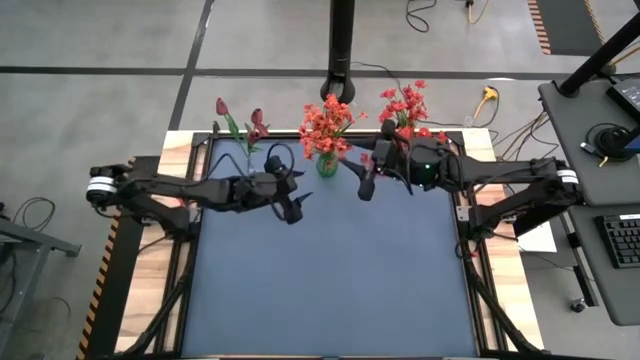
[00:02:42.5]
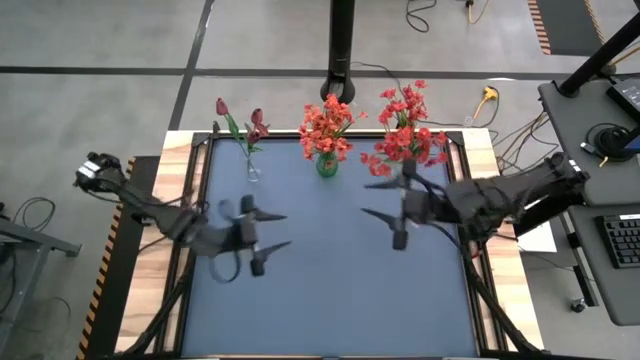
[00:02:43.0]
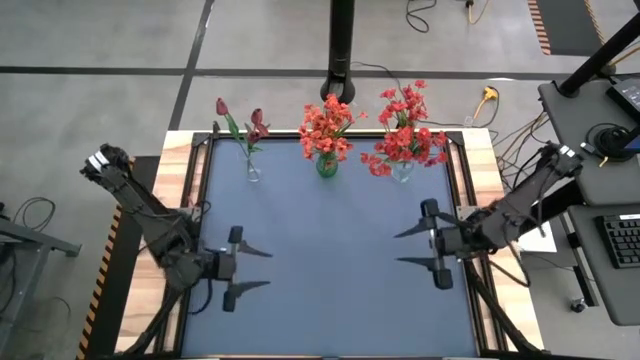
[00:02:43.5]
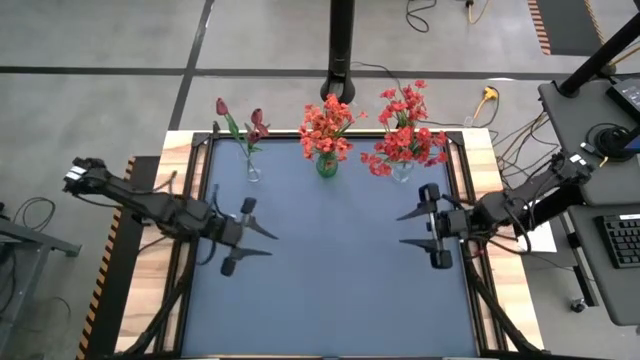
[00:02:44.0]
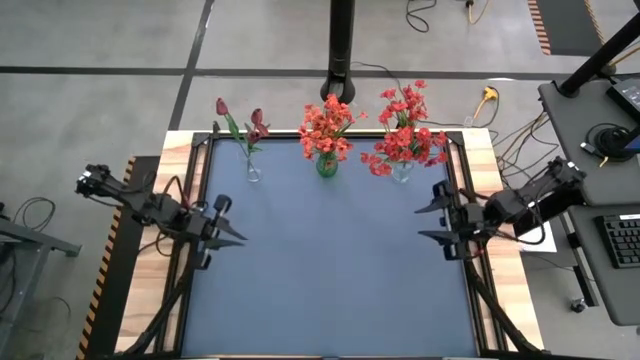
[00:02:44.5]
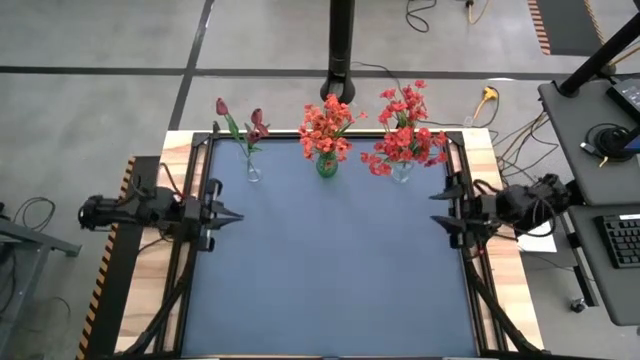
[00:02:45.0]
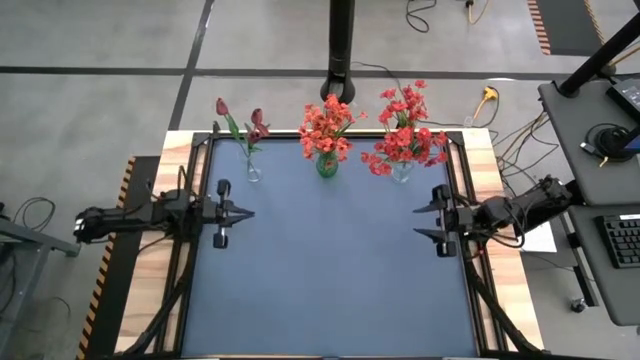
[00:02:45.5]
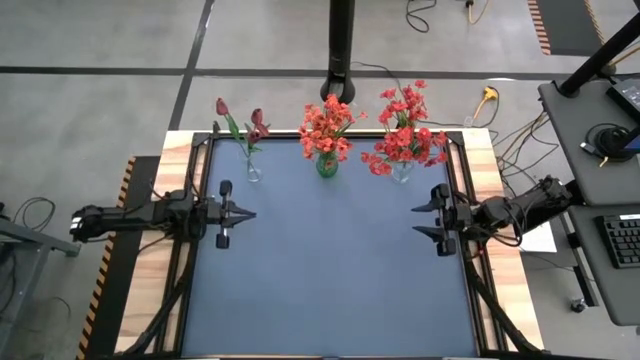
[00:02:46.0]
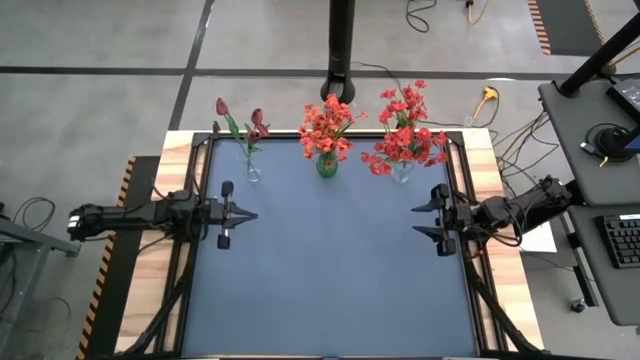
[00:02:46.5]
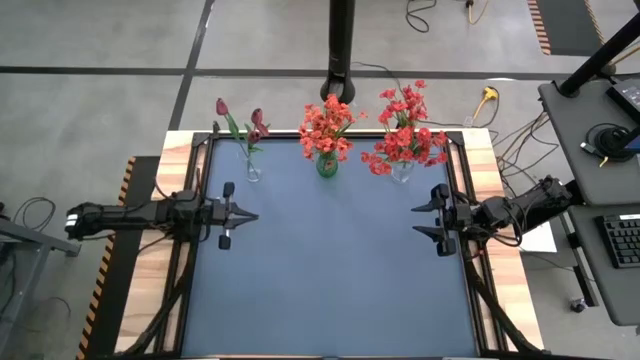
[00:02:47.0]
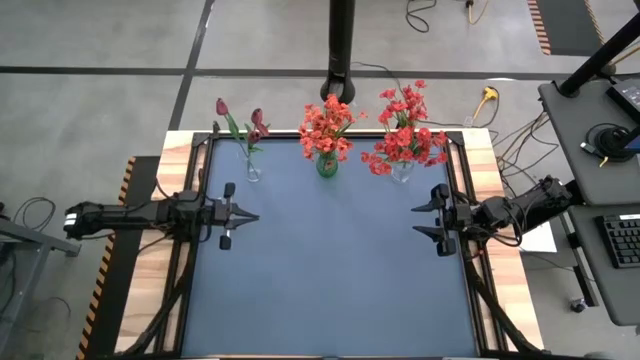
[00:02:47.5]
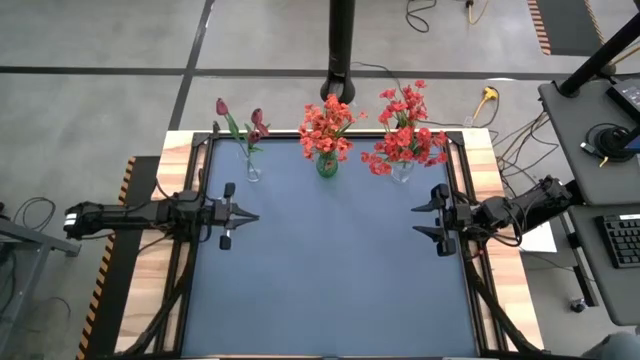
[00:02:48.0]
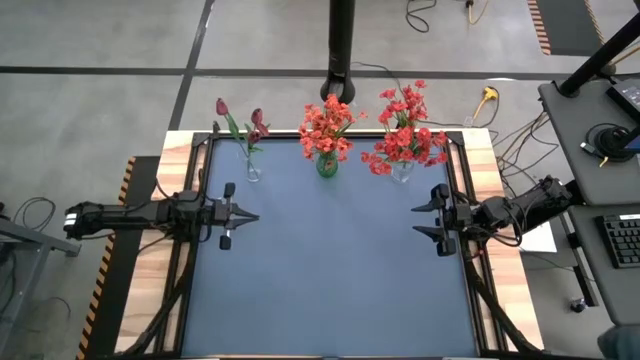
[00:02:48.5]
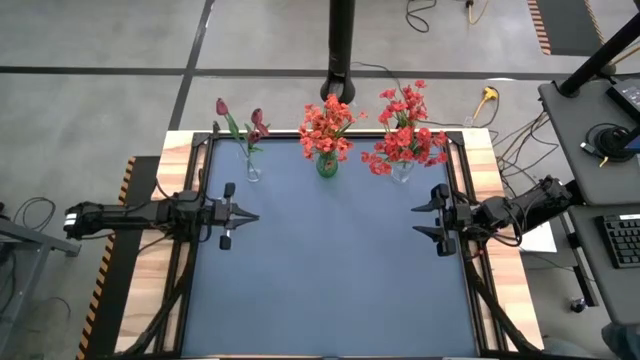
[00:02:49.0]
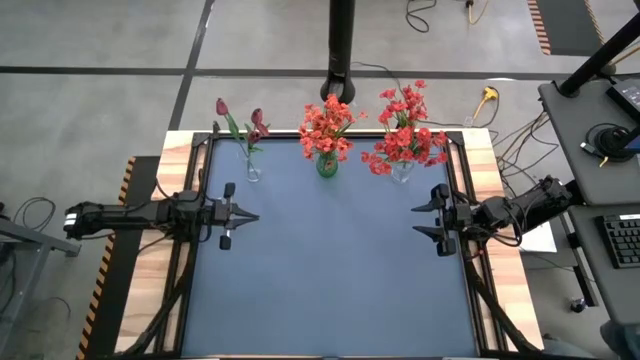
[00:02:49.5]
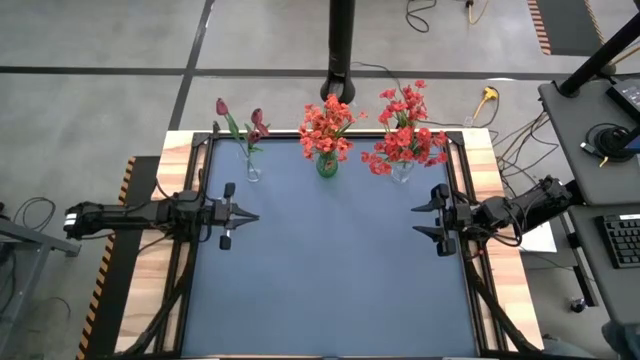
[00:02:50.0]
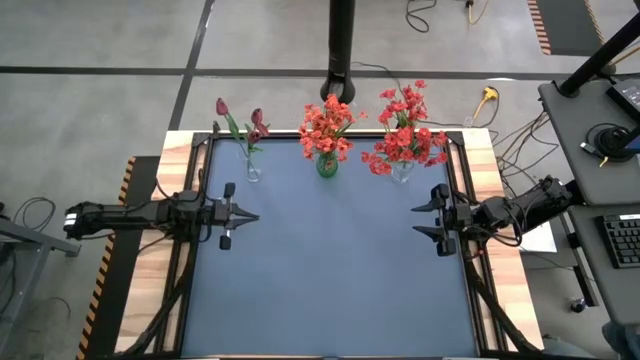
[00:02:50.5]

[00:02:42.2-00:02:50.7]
Task: Sort flowers into vase by color
Return to Home Position

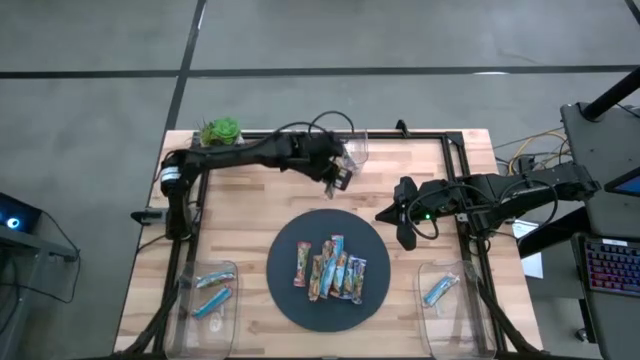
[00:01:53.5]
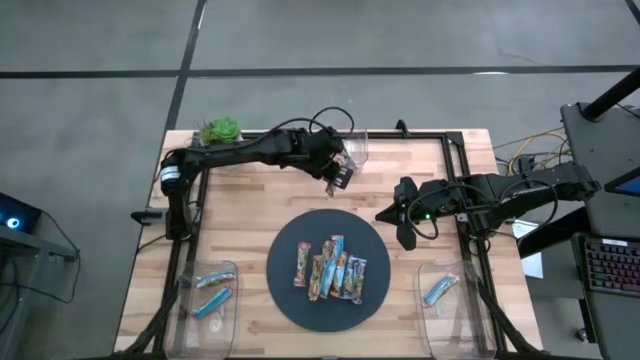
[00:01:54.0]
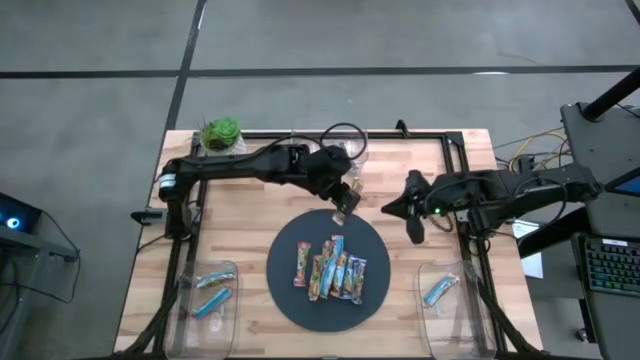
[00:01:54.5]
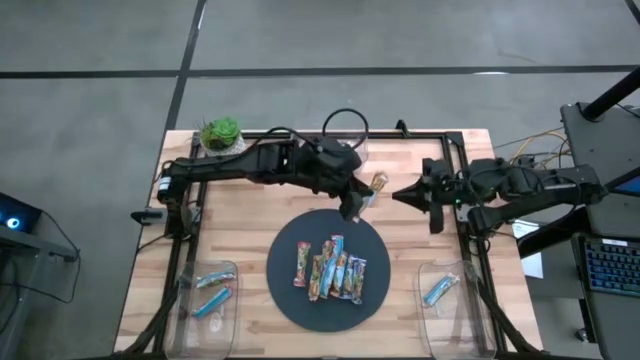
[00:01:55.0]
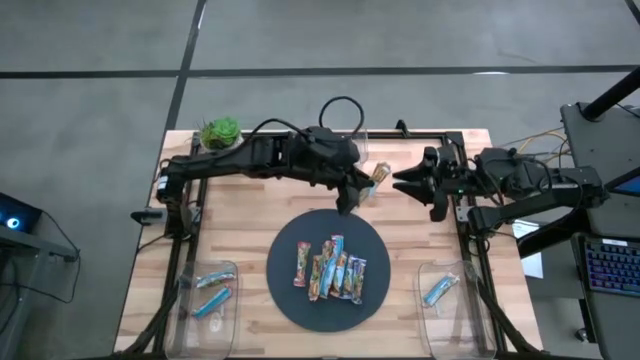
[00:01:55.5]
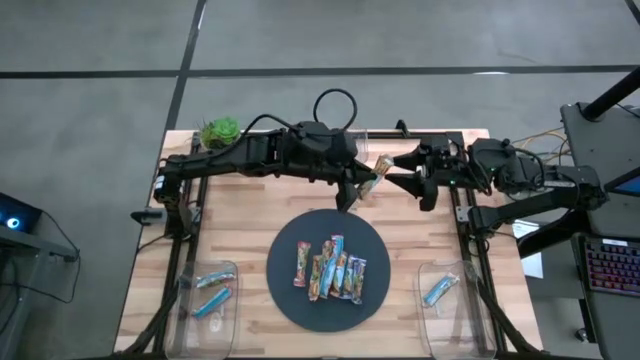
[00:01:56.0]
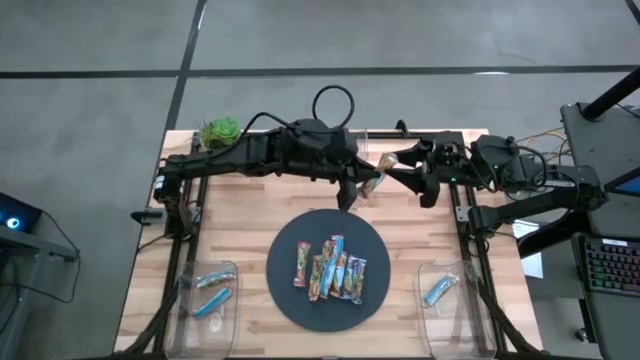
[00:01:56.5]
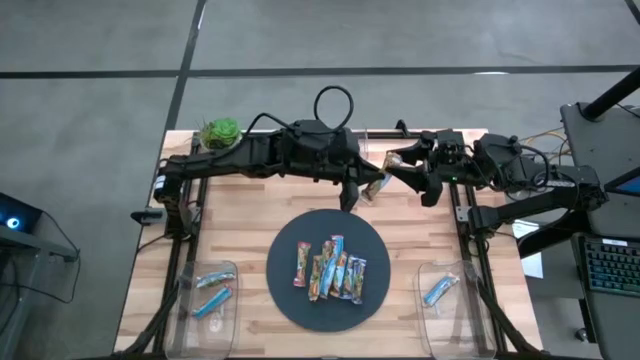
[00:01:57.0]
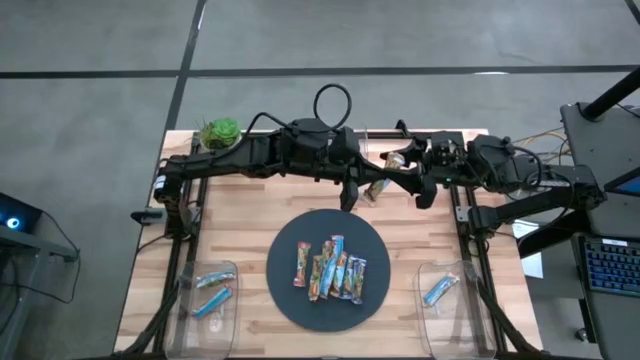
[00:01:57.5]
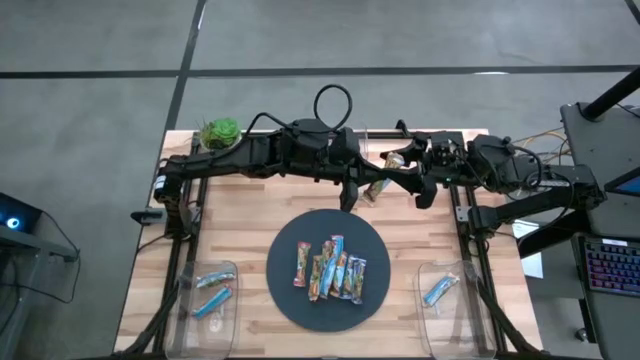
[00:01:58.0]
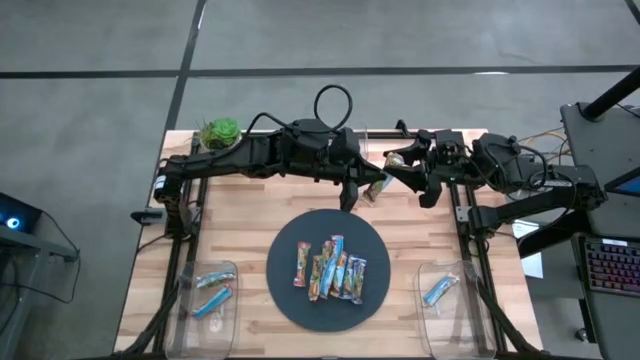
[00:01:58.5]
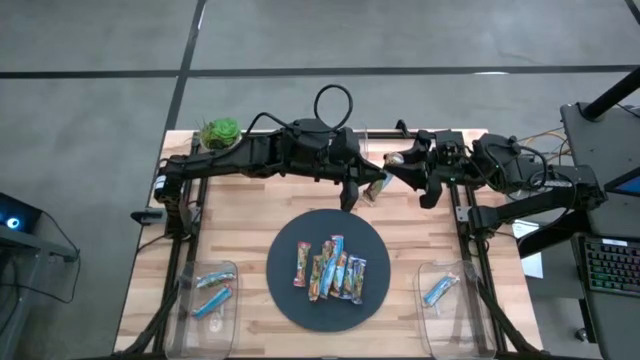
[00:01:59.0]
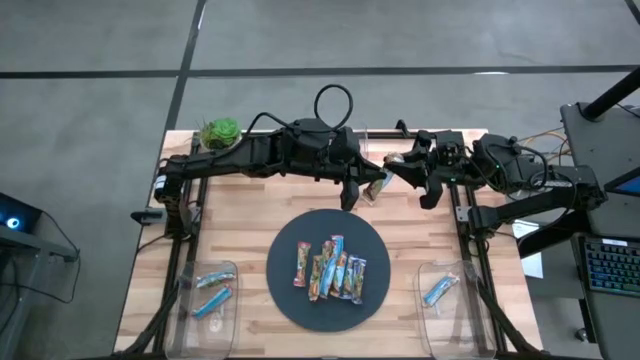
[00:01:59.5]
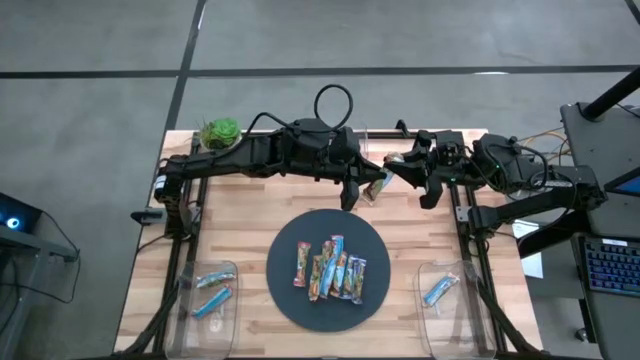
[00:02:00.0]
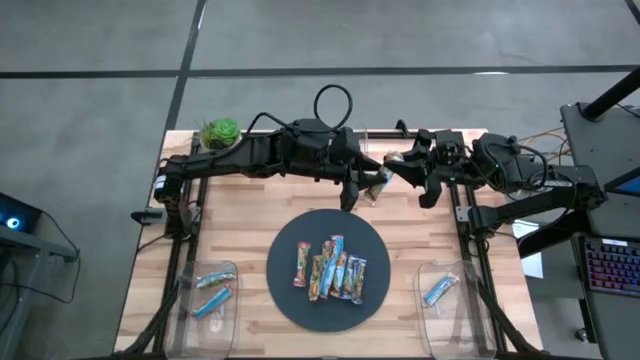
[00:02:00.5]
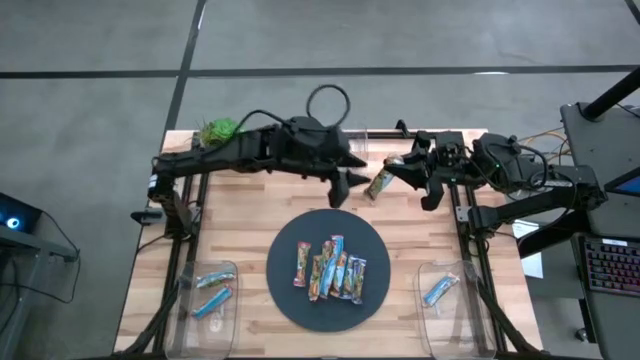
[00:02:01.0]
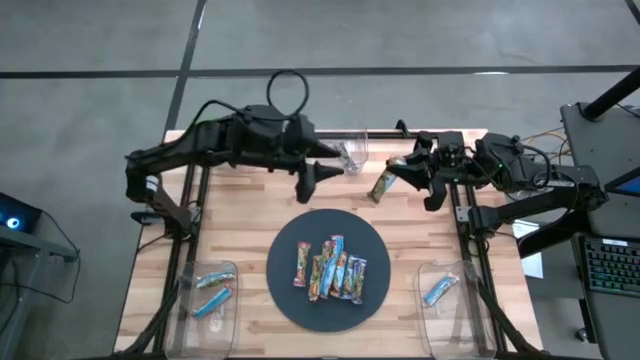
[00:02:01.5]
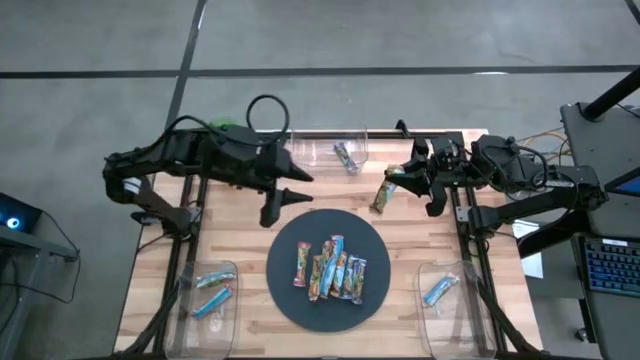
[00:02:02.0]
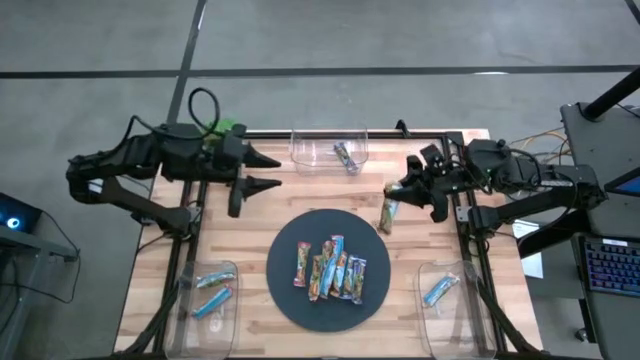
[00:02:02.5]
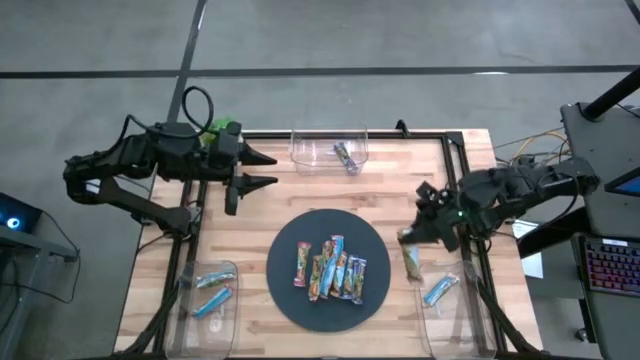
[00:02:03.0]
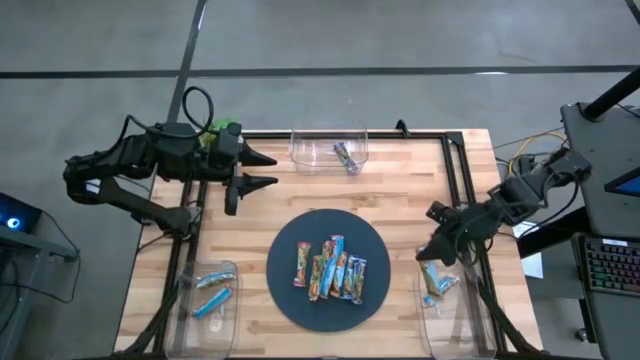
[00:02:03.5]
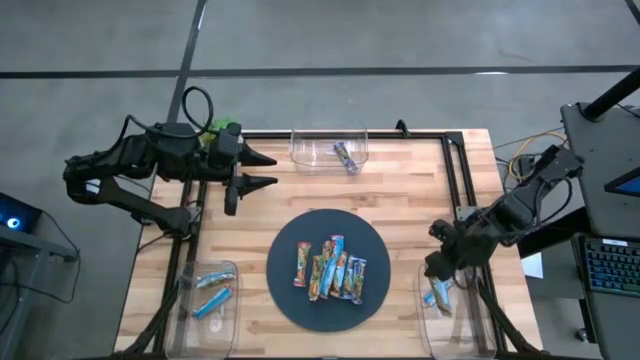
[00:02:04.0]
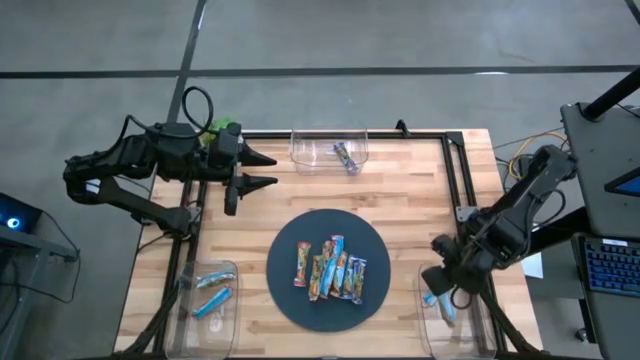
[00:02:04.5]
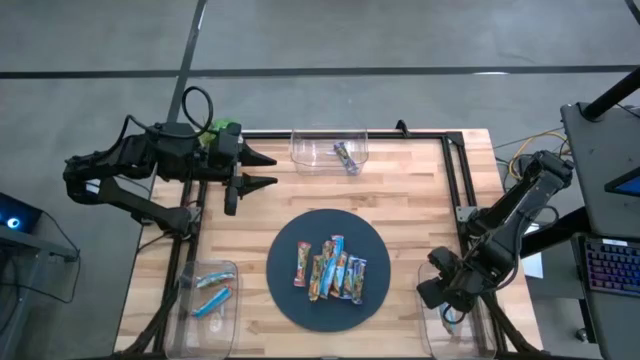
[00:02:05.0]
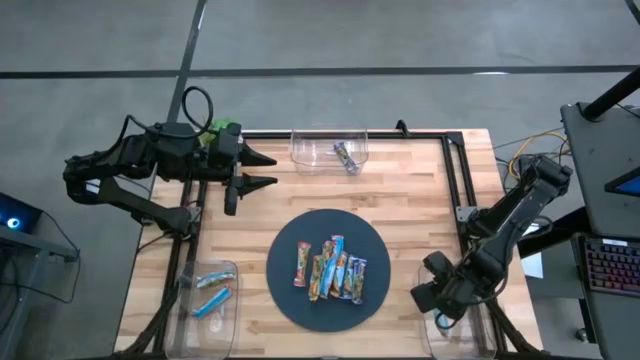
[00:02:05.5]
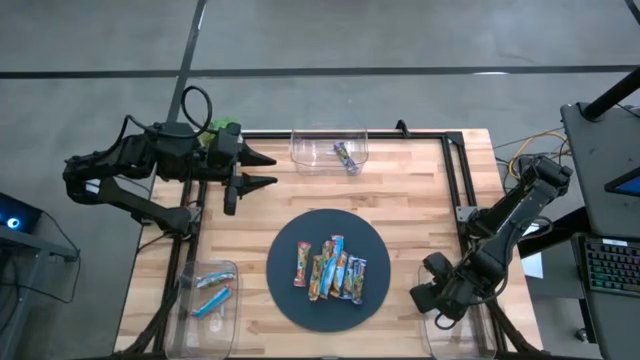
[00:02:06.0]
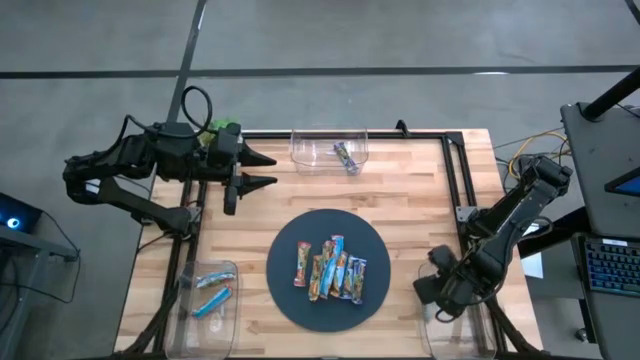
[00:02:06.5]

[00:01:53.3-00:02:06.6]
Task: Pick and place Granola Bars by type
Put the yellow granola bar into the bottom right transparent bin
